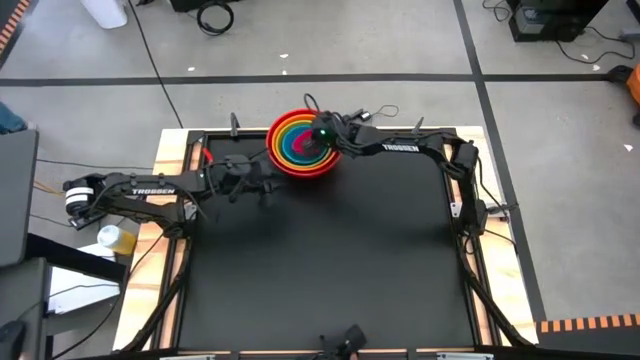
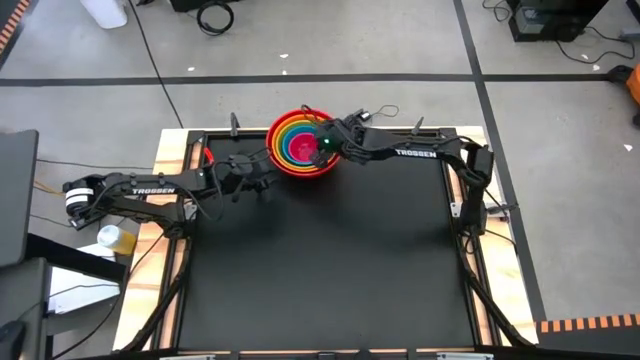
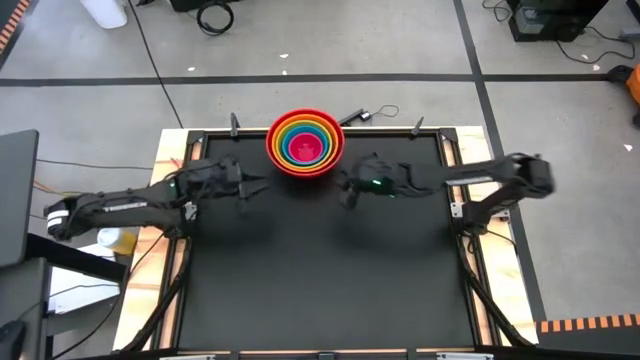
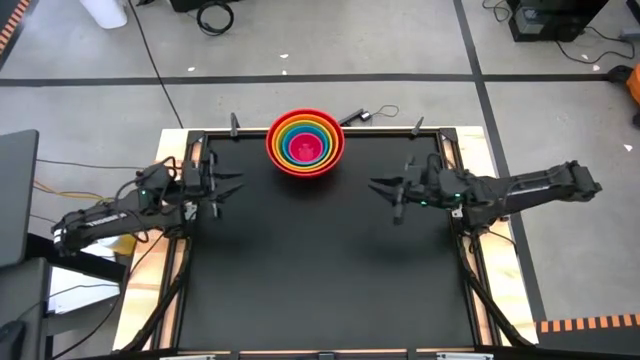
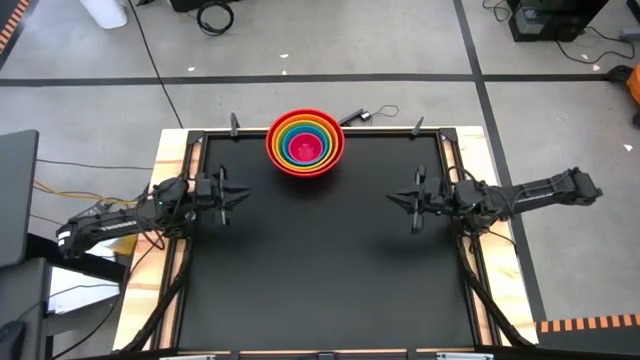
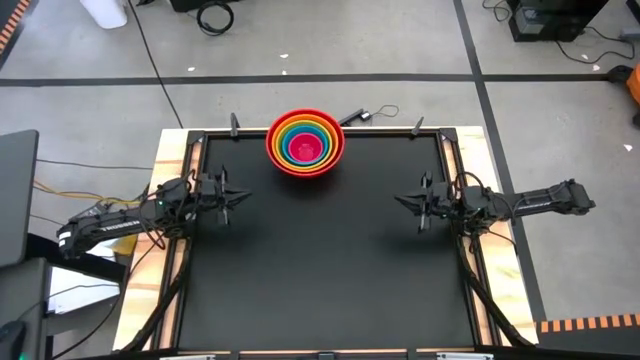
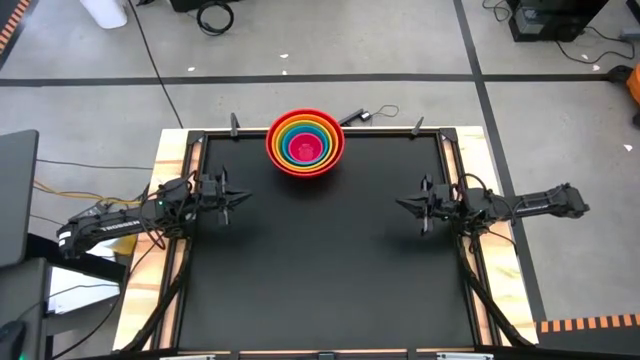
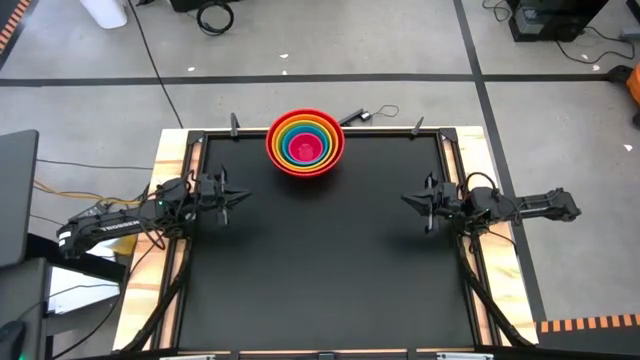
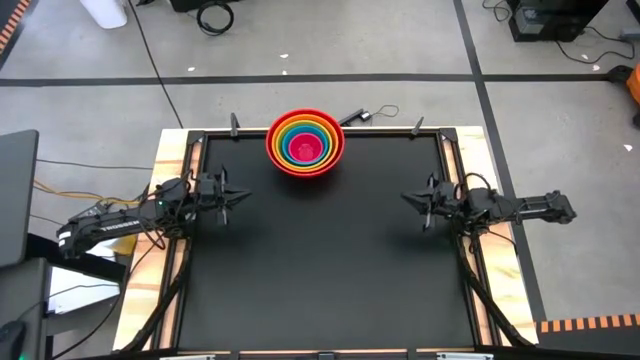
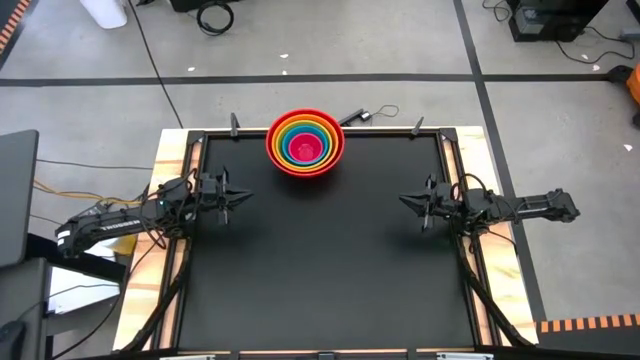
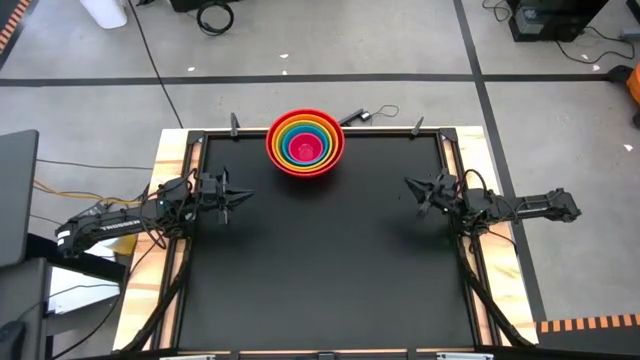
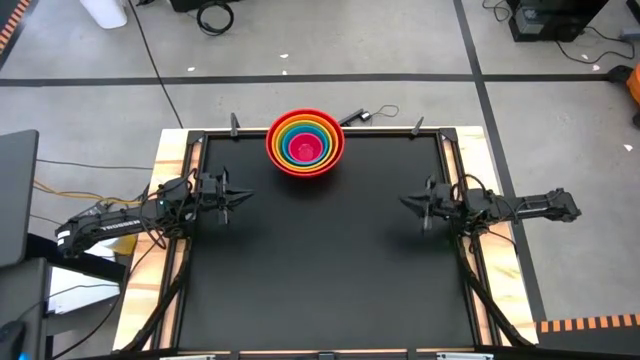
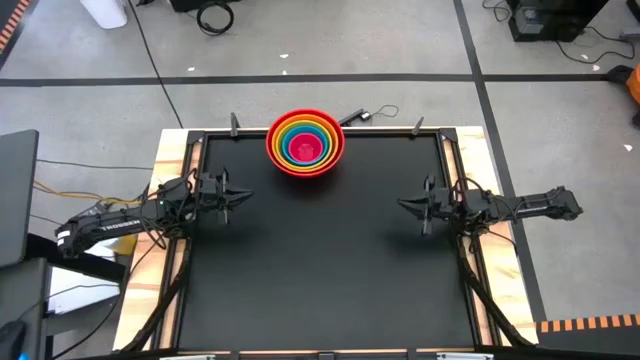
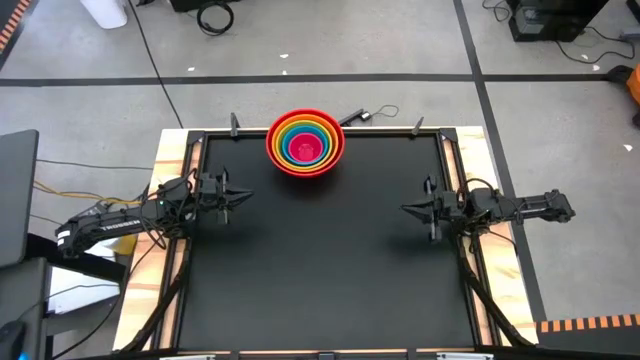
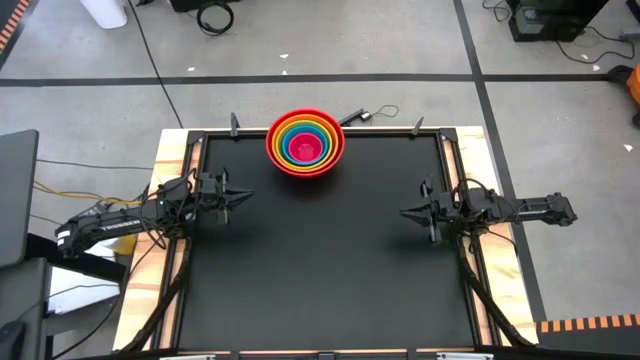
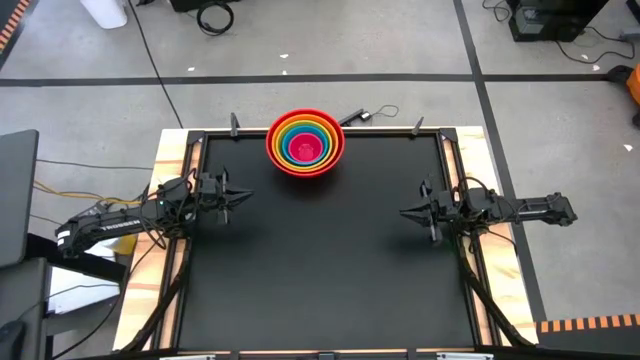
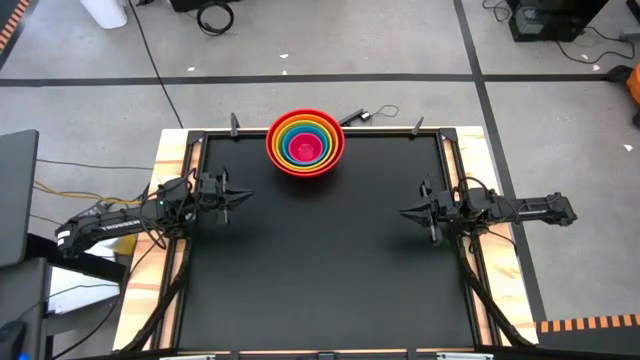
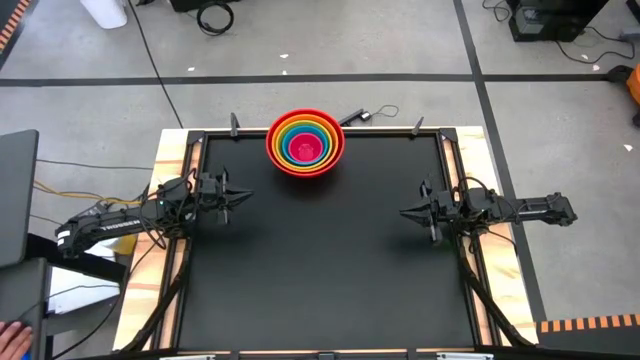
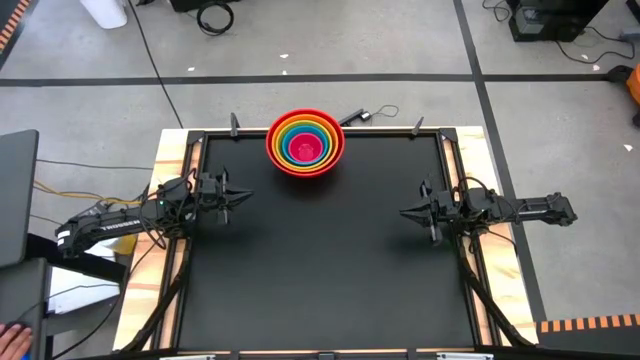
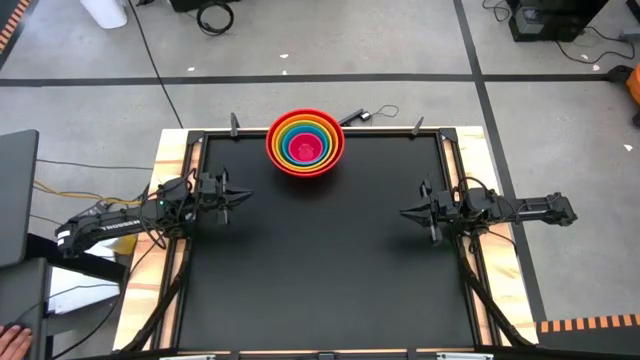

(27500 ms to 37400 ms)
Return to Home Position

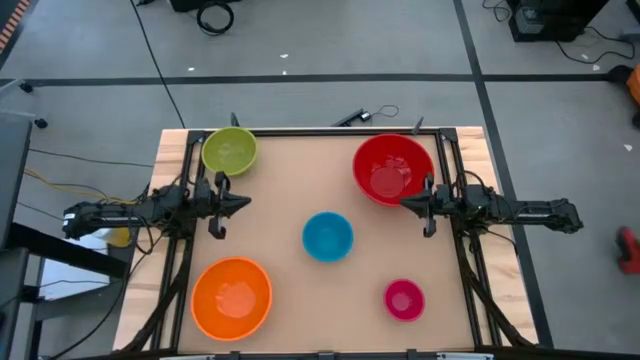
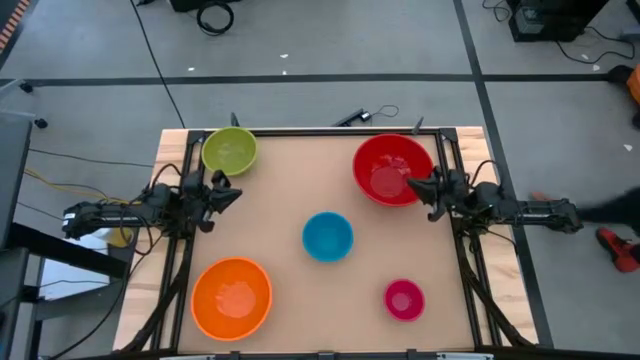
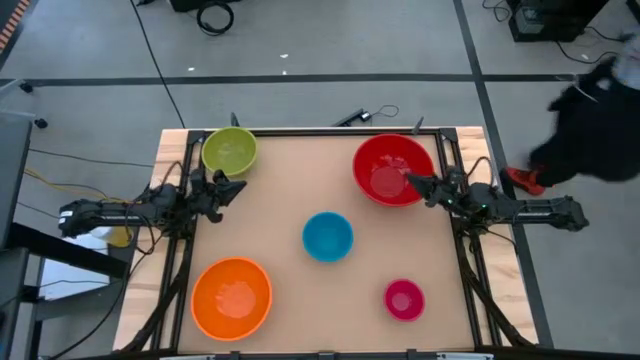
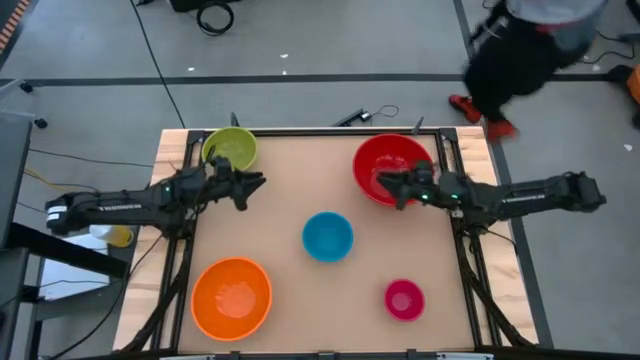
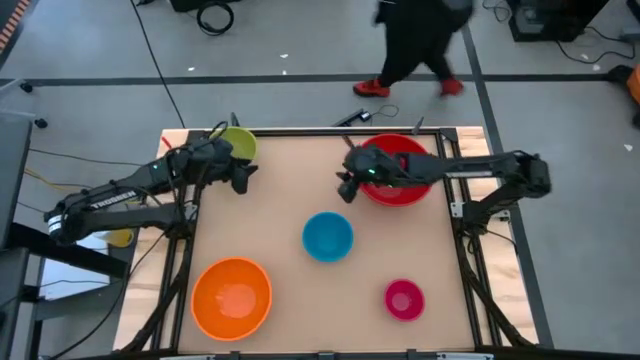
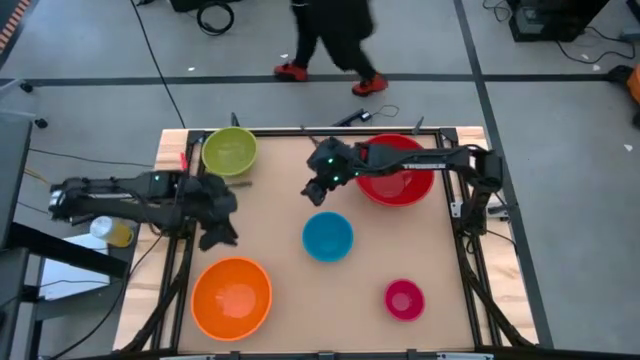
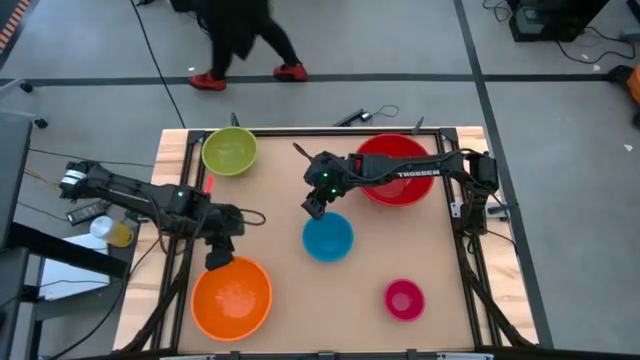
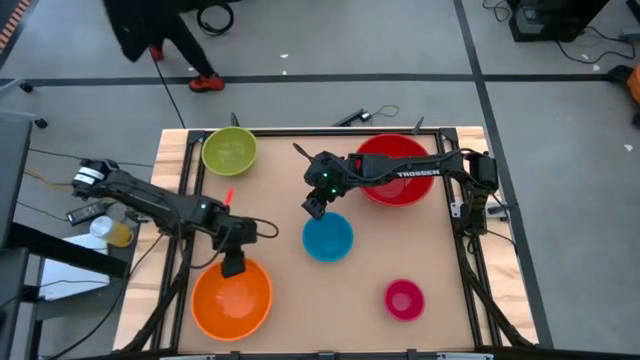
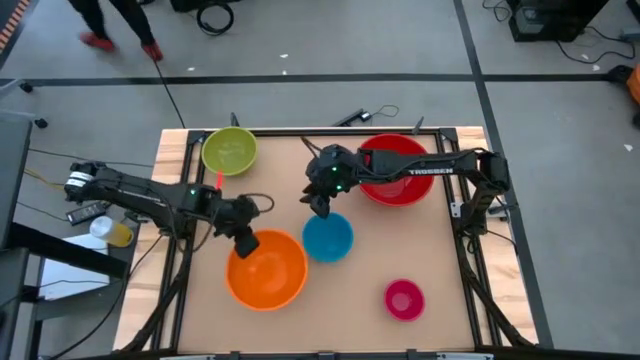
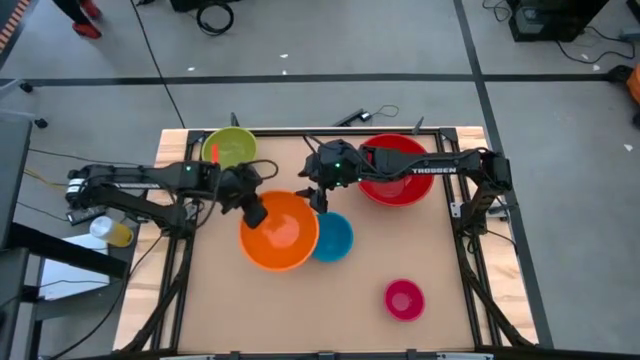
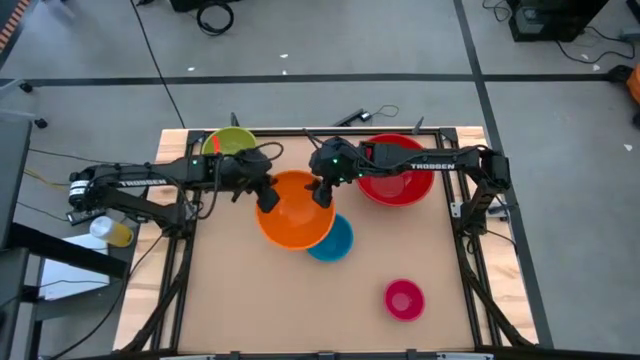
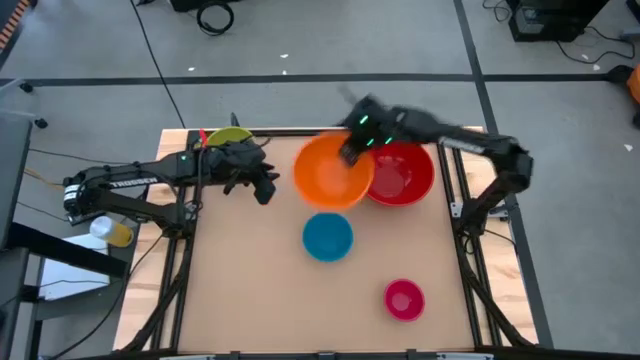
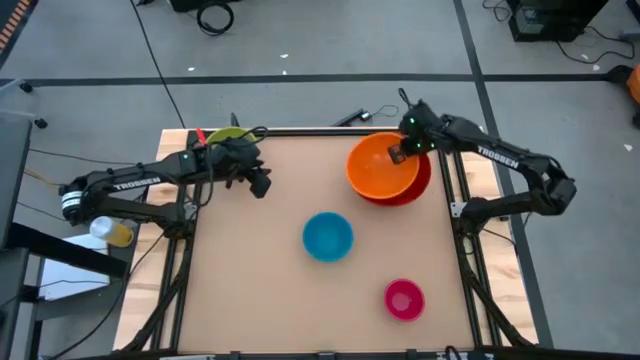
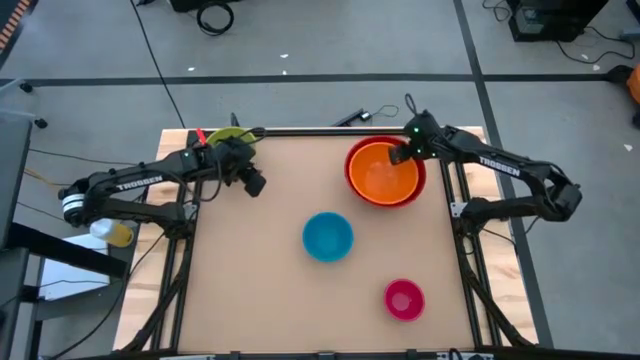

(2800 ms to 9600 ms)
Stack the orange bowl on top of the red bowl

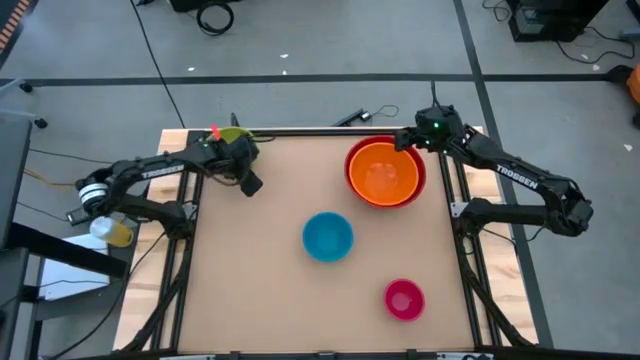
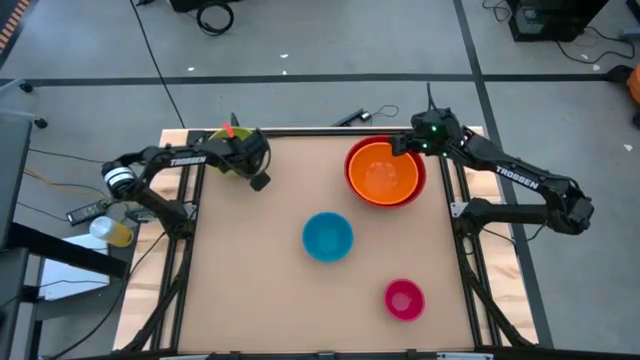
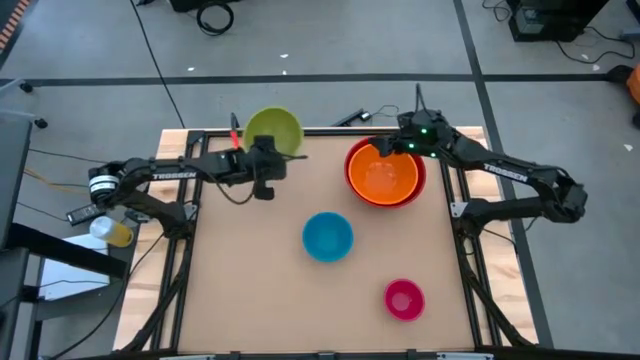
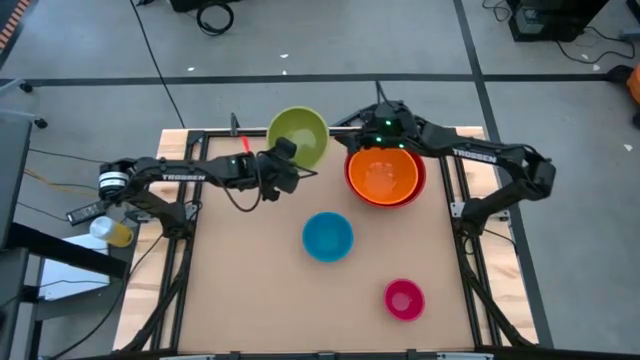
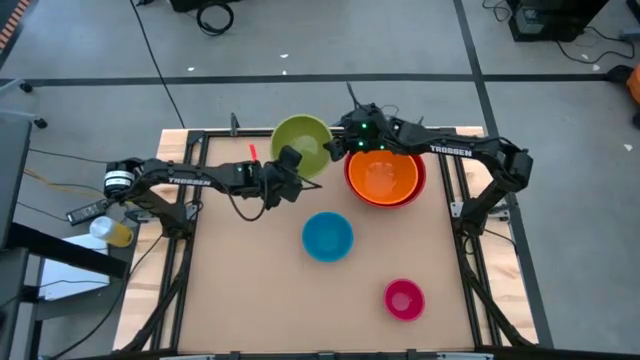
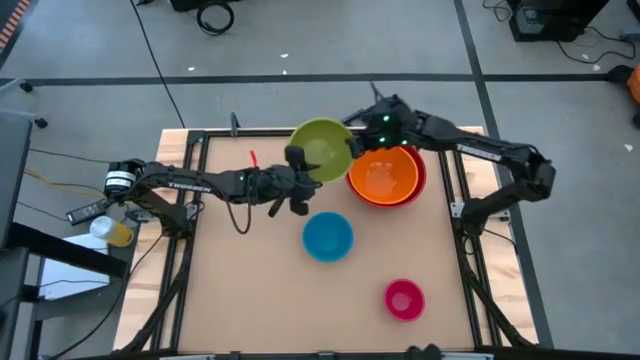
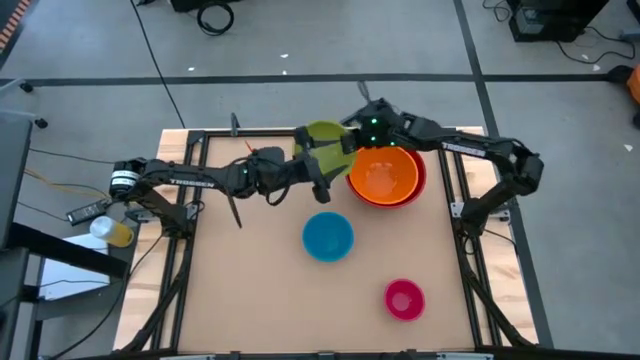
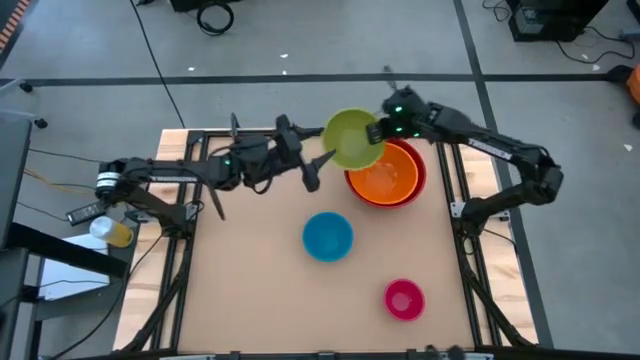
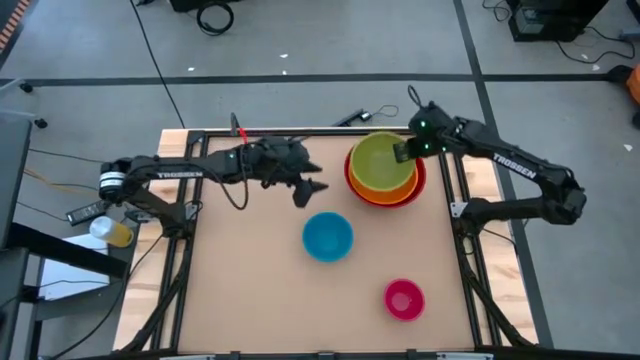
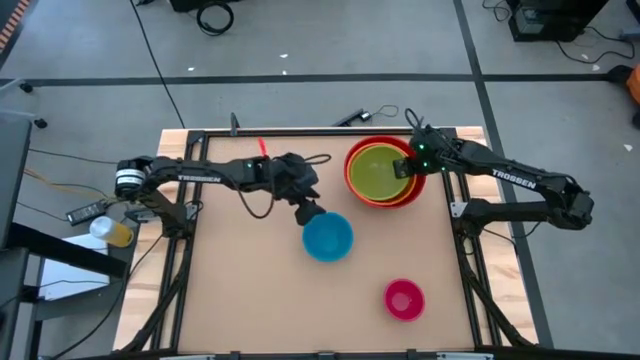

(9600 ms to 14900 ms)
Stack the green bowl on top of the orange bowl
